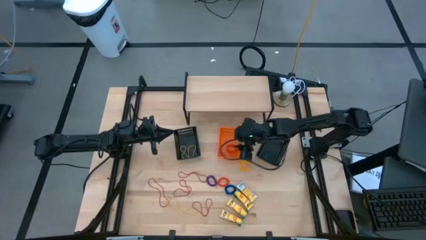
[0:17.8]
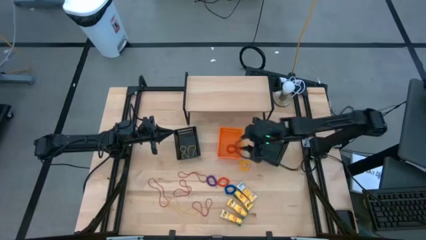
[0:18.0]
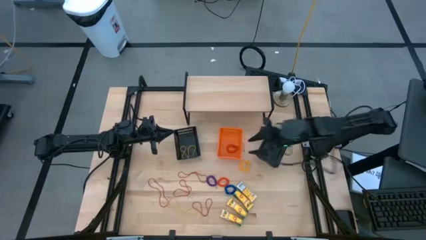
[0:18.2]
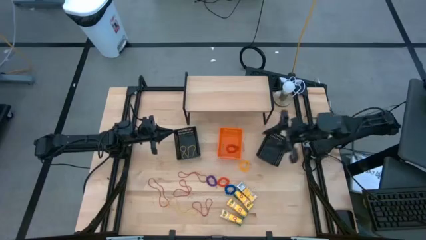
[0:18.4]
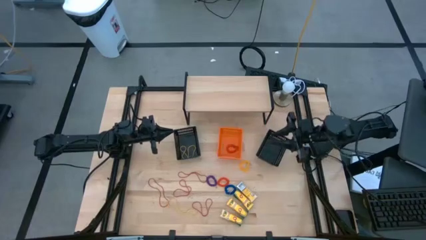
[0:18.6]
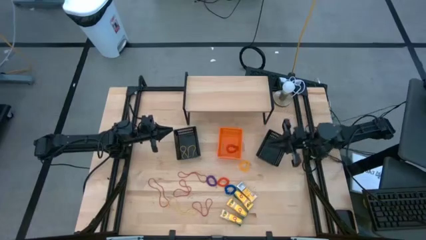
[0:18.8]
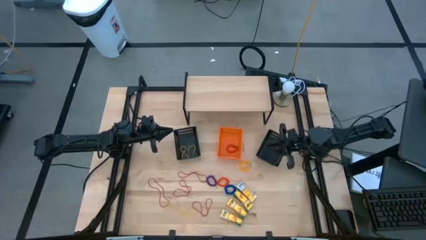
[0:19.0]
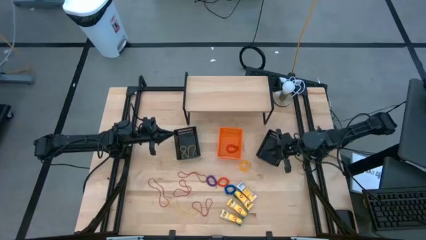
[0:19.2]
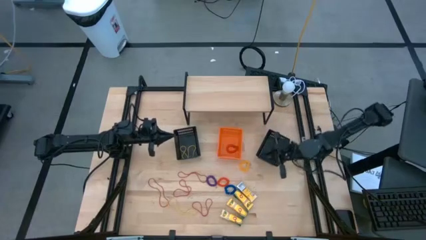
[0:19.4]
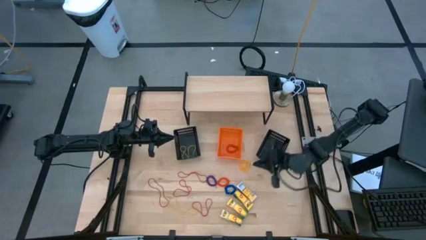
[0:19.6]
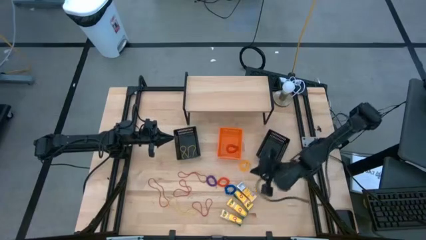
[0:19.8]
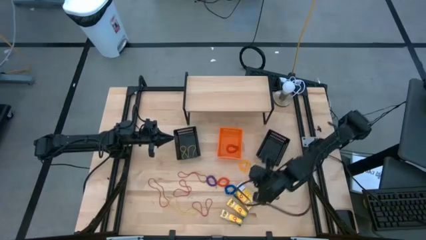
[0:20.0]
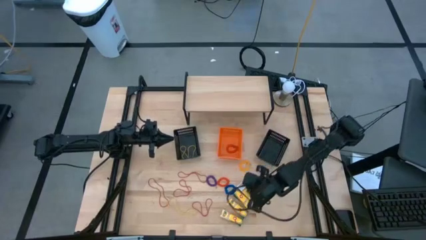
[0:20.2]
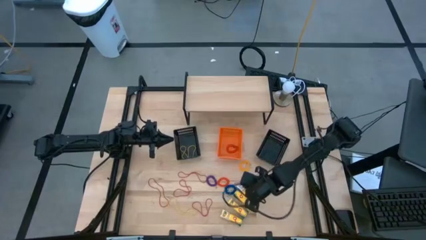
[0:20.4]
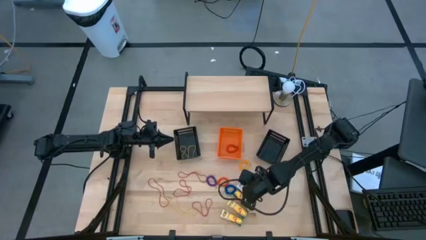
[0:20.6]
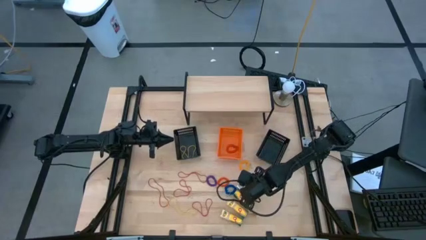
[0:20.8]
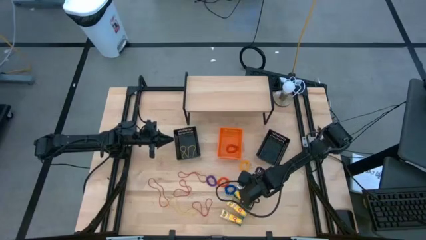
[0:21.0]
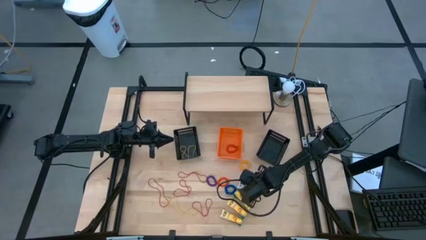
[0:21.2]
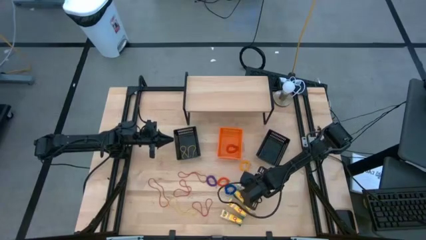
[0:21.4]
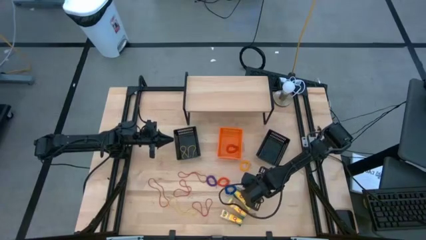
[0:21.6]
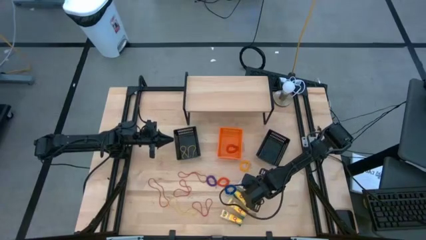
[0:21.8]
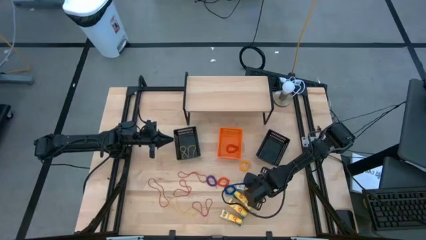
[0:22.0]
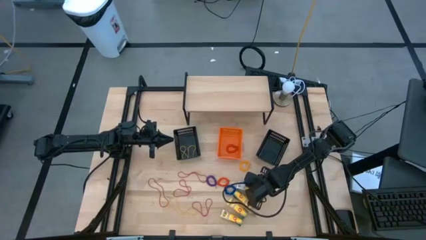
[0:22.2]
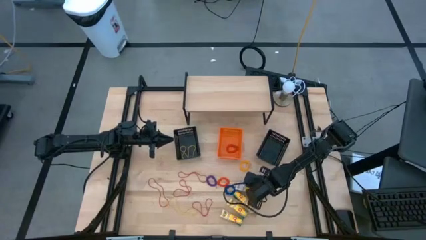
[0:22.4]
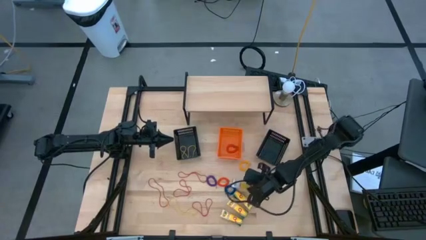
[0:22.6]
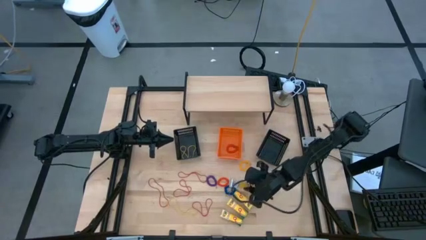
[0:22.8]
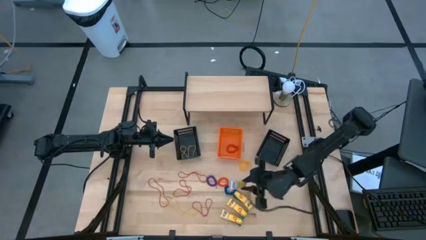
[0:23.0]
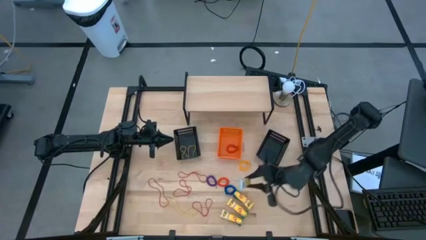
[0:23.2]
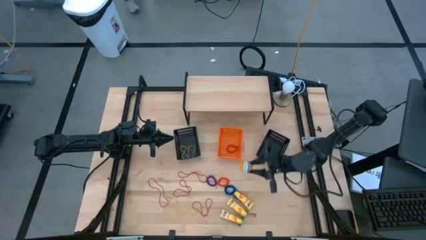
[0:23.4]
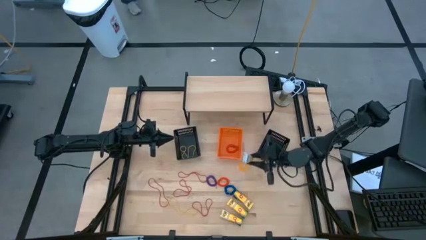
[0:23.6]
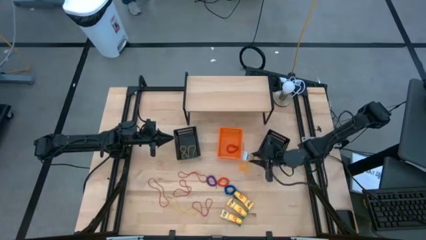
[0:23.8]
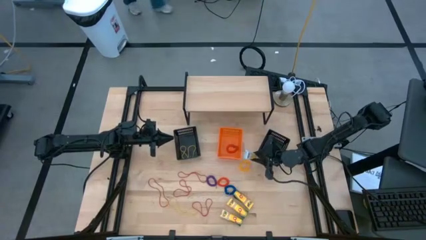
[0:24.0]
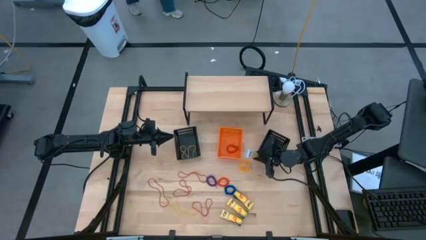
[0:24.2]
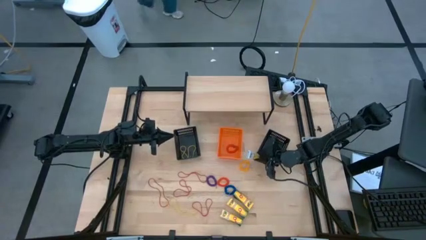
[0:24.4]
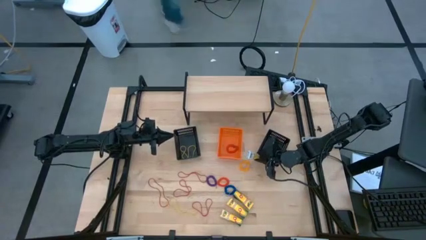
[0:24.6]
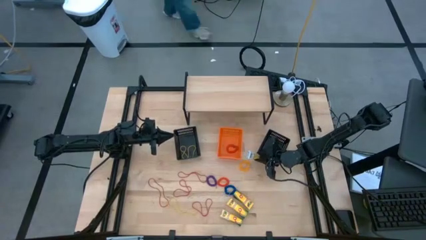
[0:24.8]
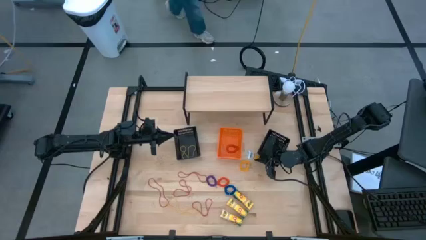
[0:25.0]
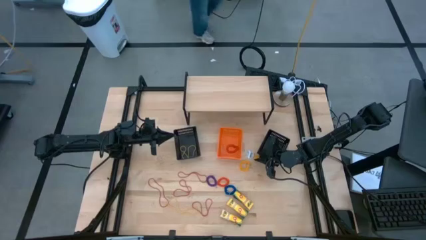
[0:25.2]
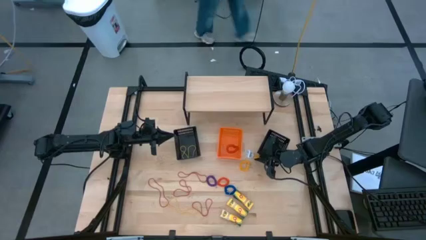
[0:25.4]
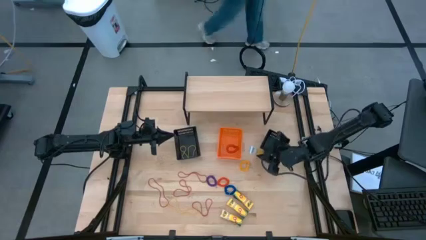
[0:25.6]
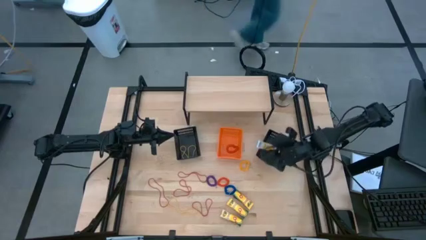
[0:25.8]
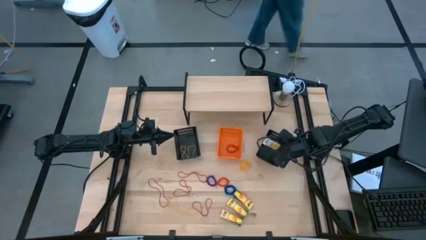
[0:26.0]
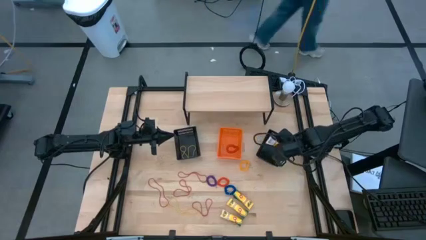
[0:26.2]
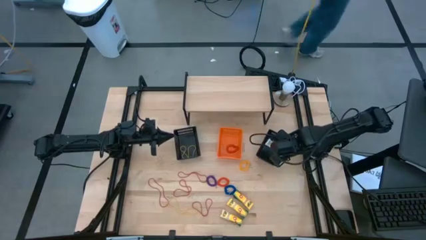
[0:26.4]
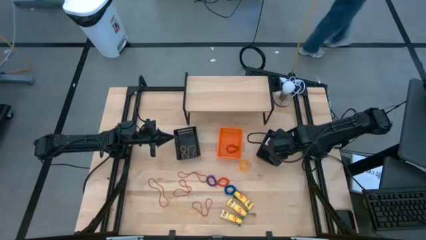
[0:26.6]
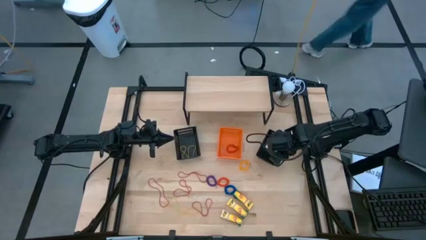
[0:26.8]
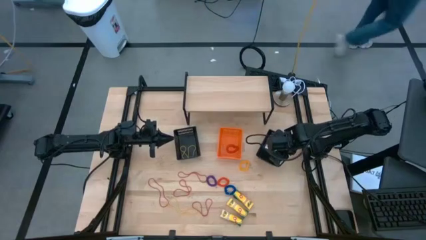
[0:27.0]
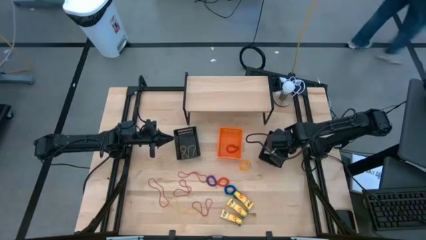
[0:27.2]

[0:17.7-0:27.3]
Task: Pick & Place Office Desk Supplies
Put the yellow crayon box into the right black bin

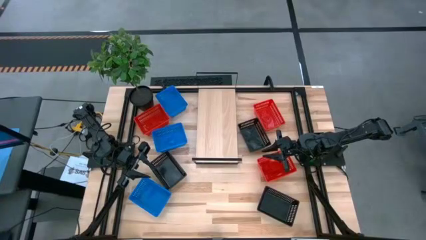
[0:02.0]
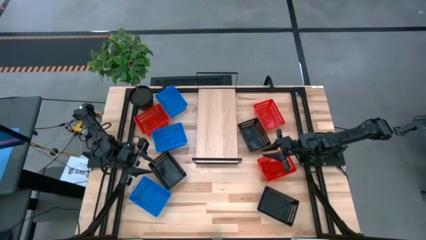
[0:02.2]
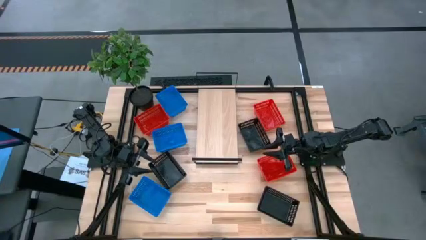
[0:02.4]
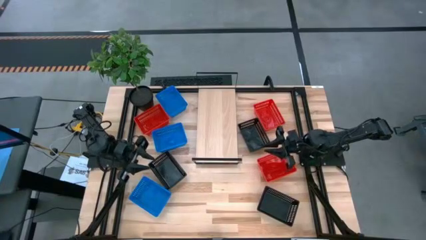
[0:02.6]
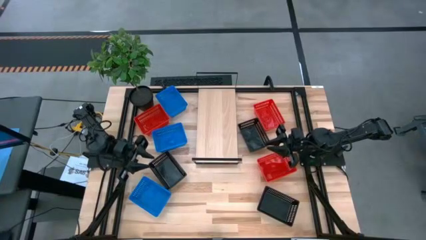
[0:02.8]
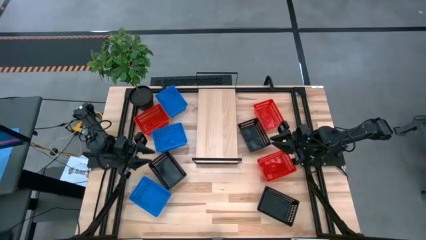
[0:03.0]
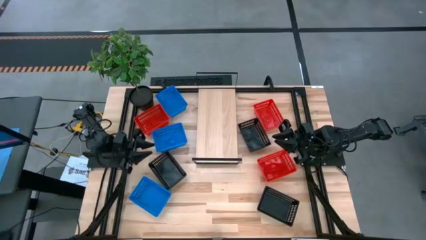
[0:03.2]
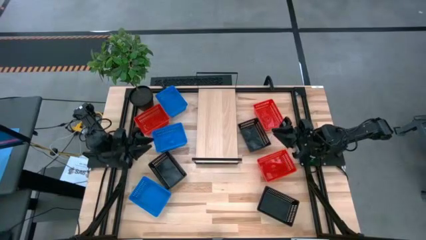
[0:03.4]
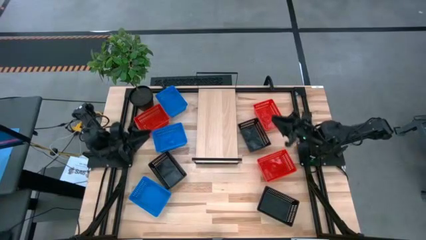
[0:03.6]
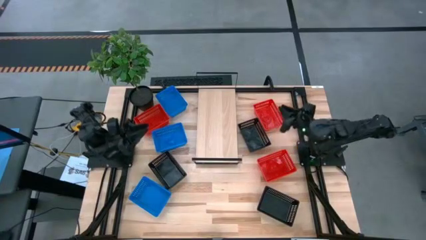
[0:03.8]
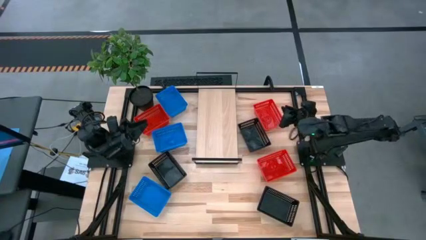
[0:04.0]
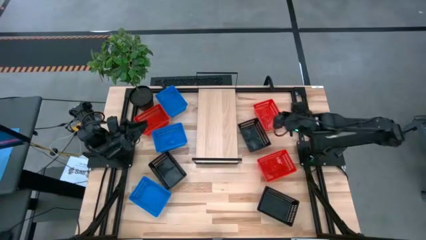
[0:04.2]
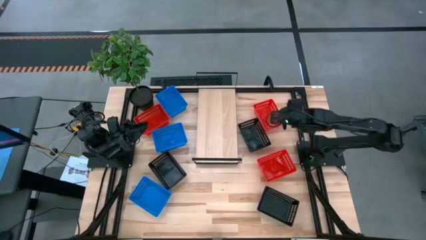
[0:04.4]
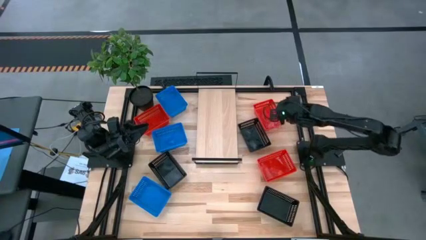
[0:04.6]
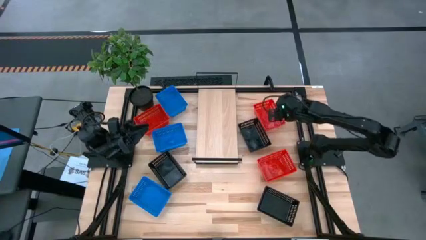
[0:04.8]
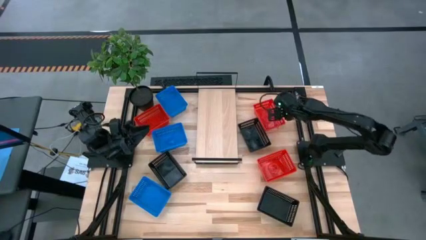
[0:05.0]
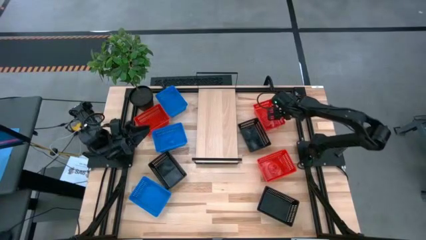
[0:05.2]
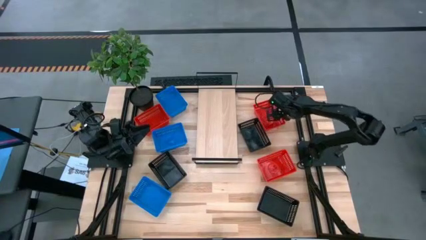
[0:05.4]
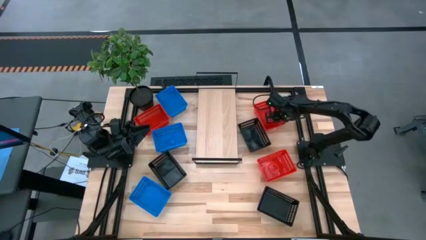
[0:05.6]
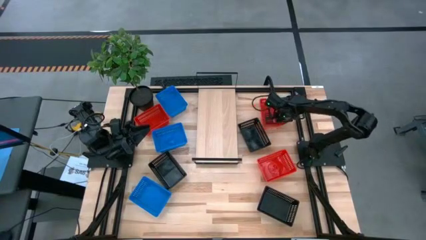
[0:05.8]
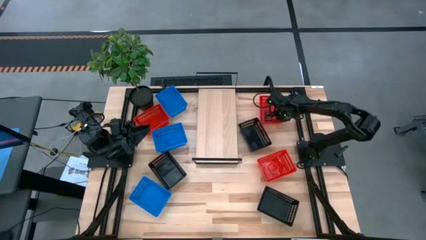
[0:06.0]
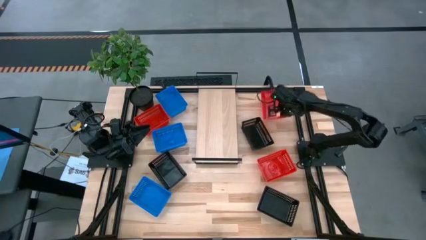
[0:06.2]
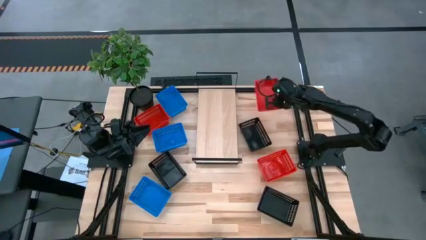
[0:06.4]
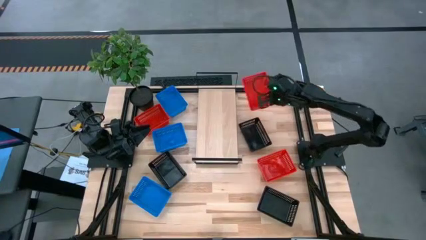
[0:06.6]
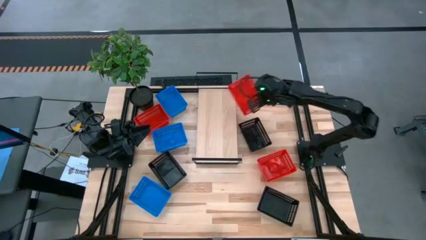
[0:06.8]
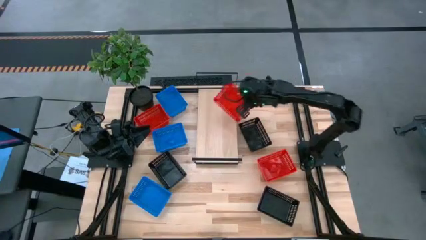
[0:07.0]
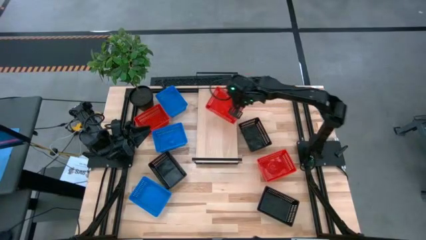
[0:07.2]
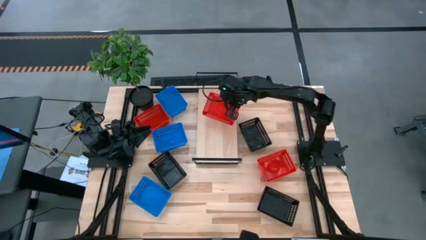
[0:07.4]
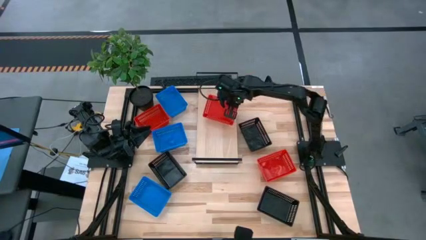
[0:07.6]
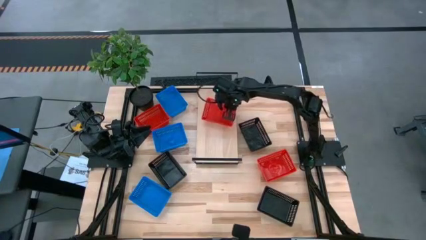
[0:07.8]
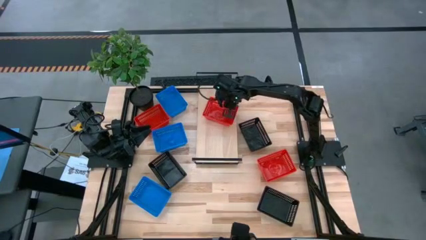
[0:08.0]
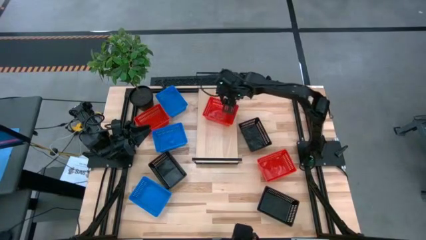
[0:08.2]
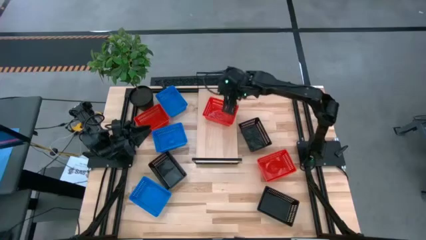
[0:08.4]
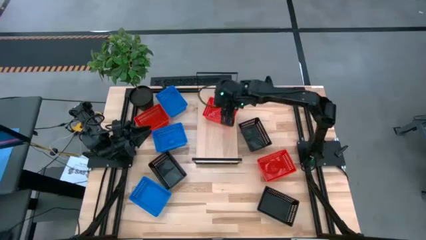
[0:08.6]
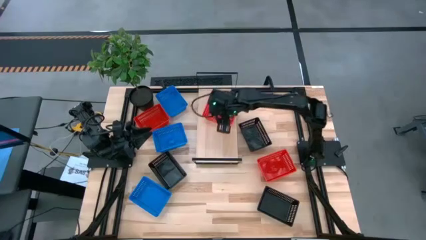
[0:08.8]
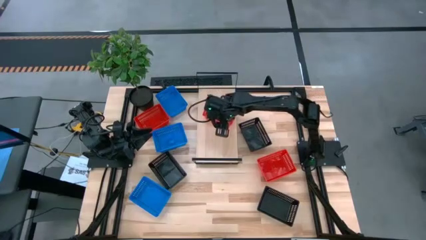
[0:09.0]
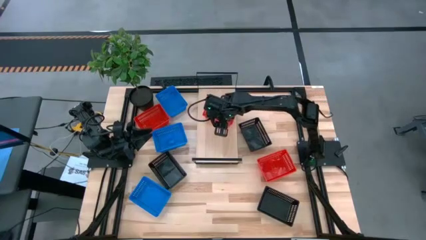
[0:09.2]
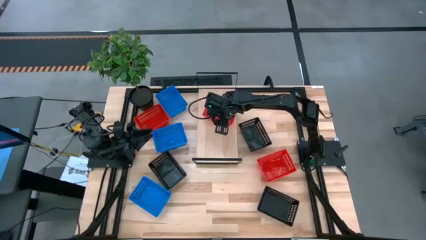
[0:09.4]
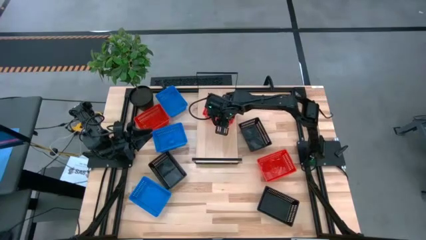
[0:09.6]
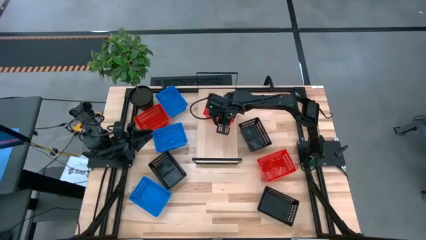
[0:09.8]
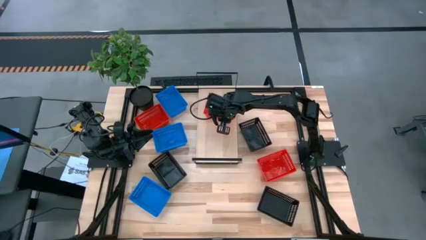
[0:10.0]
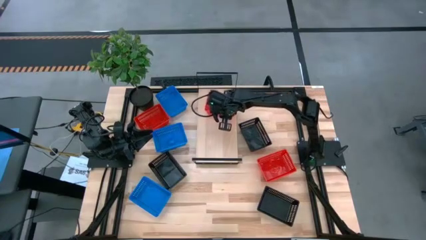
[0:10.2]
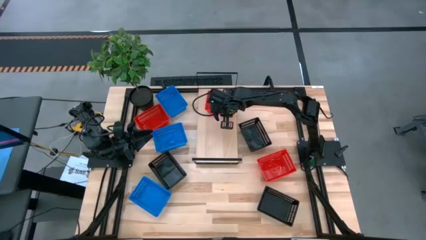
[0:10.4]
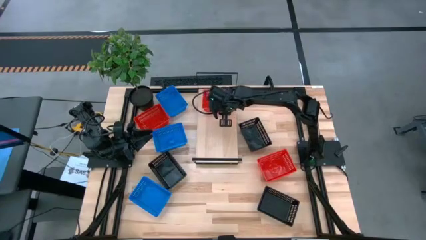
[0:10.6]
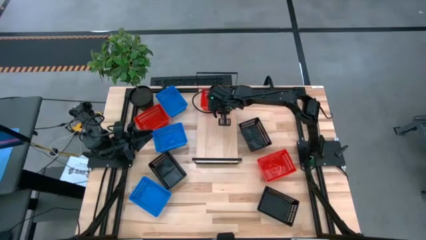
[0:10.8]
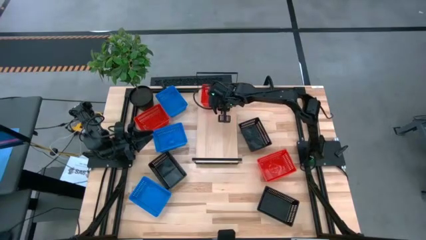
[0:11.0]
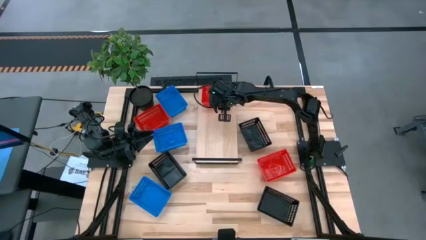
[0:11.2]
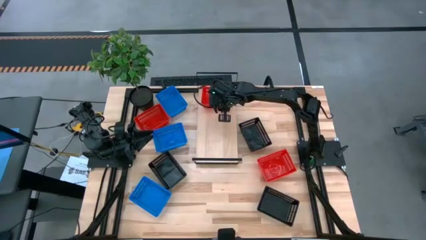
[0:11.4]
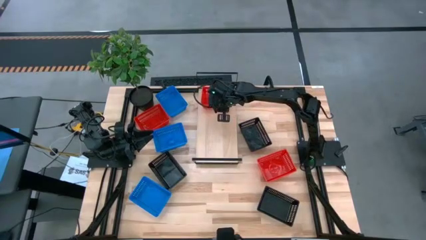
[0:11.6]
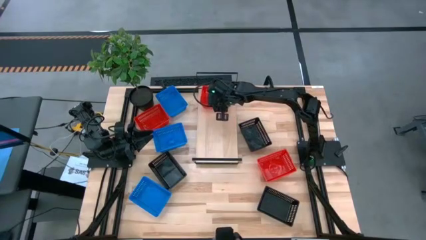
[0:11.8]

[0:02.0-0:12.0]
Task: Stack baskets on shelf by color
Put the top right red bin on the shelf
